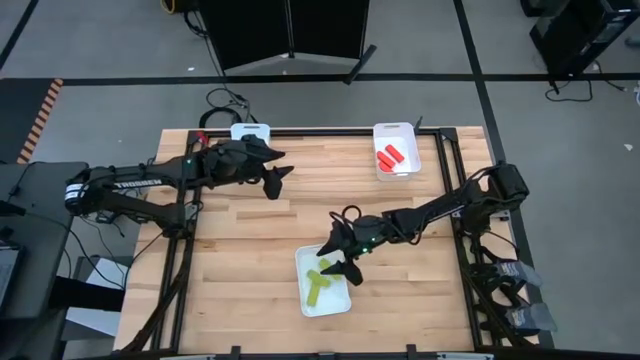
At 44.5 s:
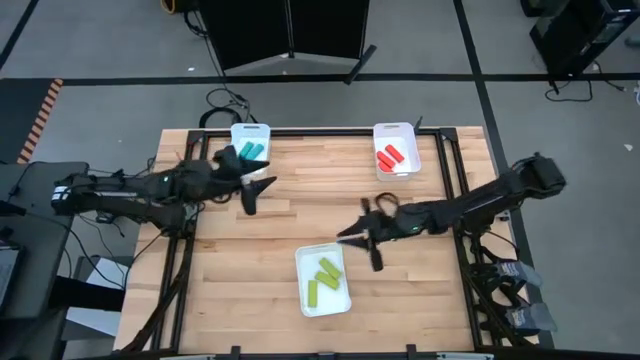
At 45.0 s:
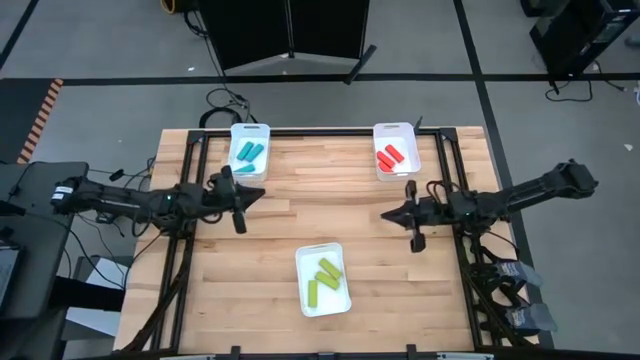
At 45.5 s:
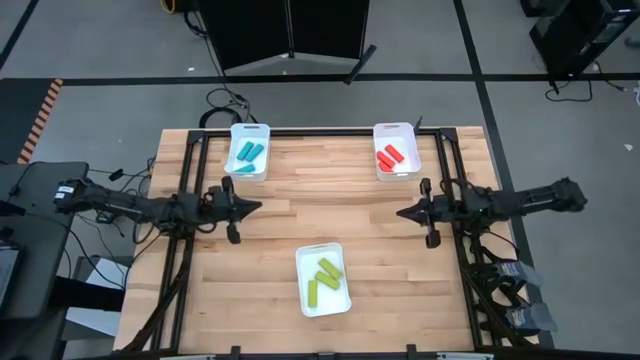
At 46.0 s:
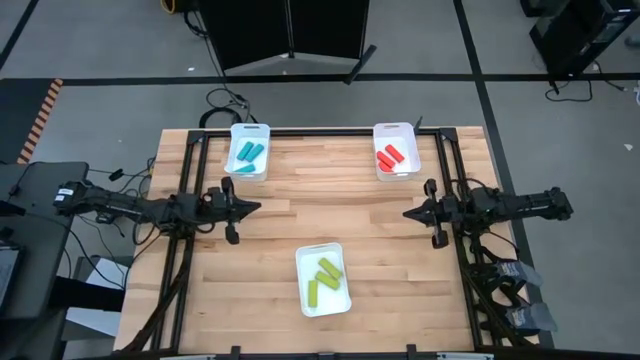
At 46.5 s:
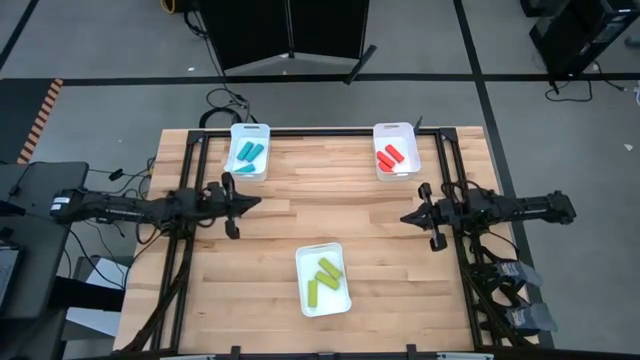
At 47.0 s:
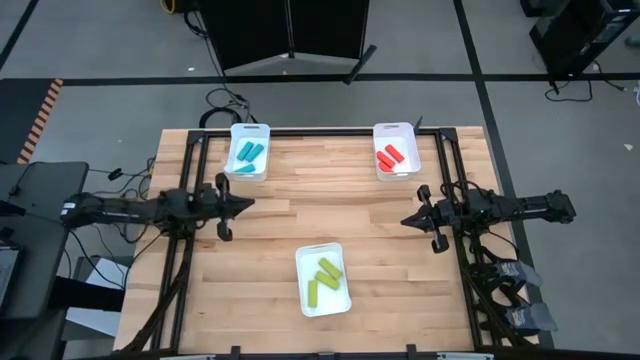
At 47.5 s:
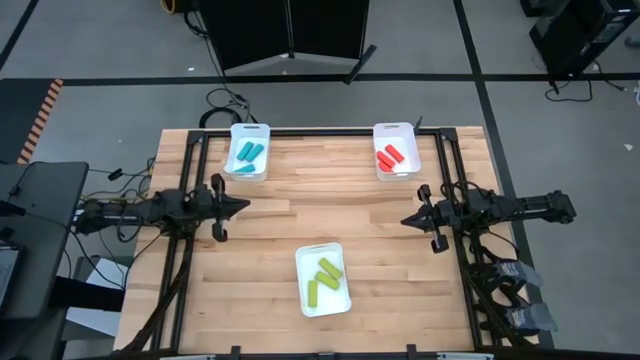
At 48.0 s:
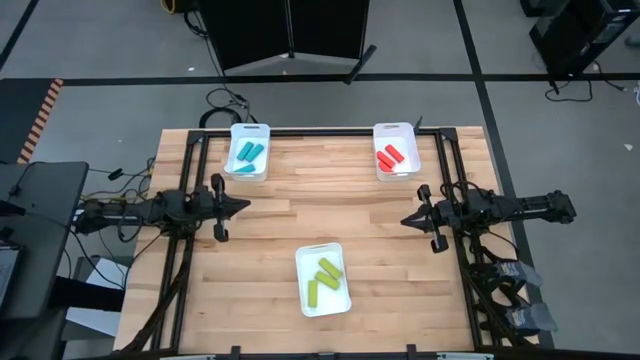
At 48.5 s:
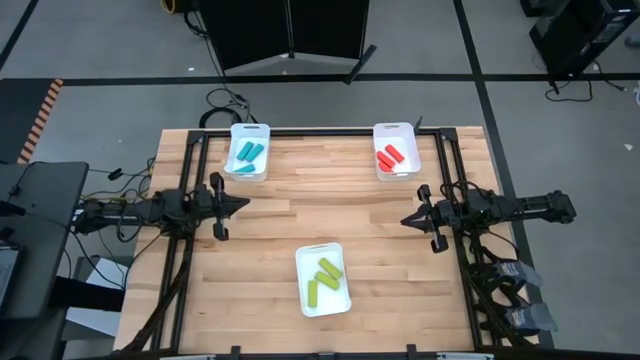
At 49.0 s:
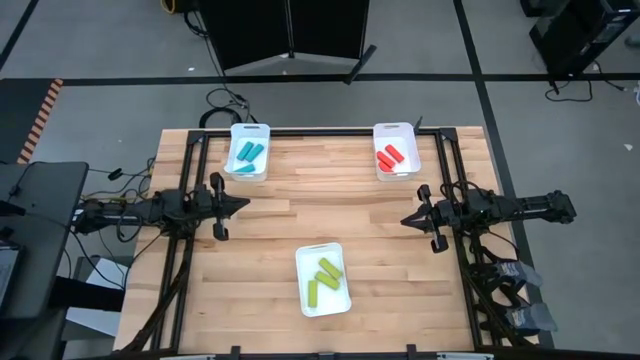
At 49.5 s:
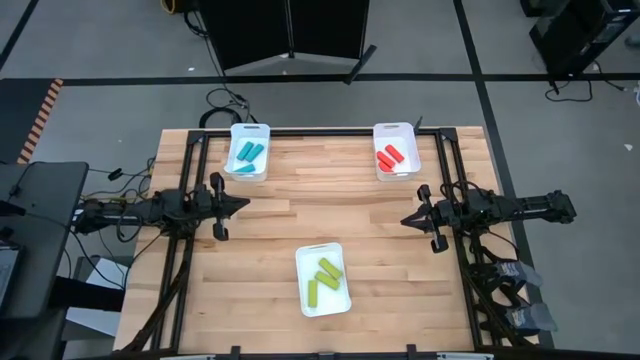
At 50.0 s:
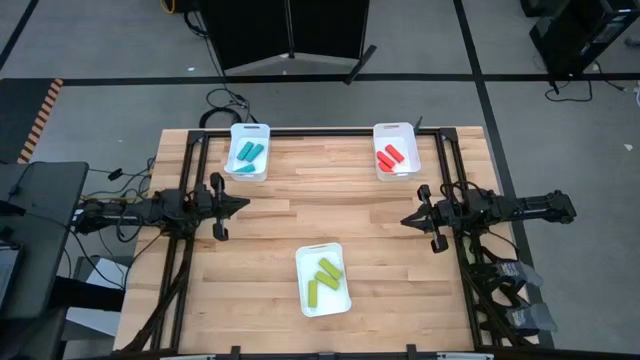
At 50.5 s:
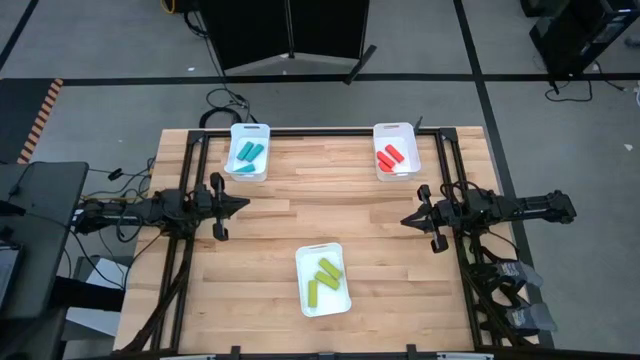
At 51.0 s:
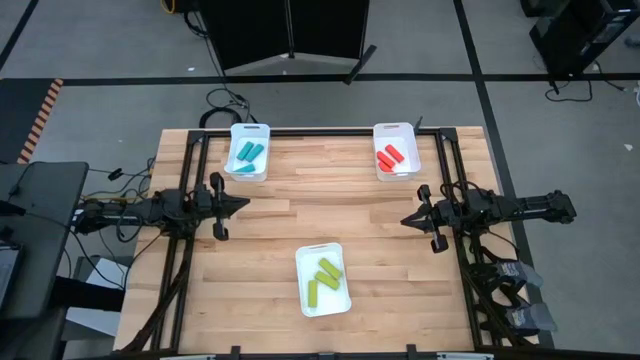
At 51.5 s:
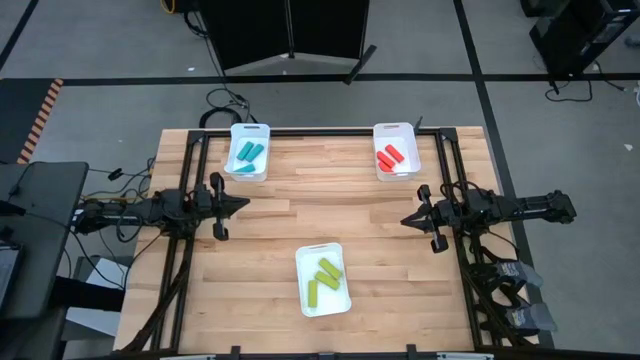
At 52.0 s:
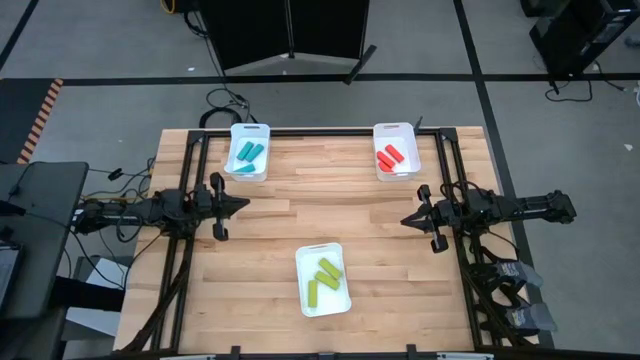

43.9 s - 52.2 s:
Task: Sort blocks
Return to Home Position

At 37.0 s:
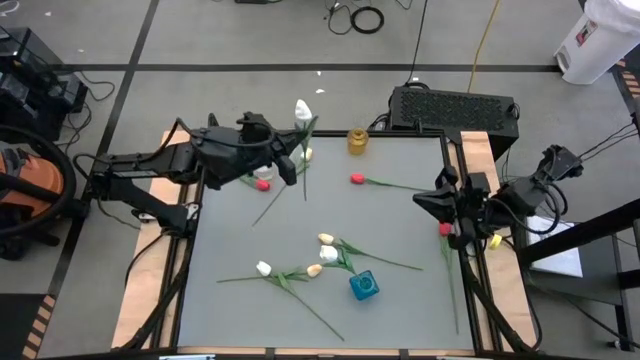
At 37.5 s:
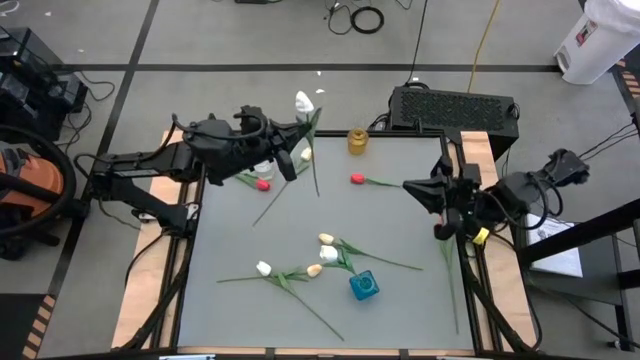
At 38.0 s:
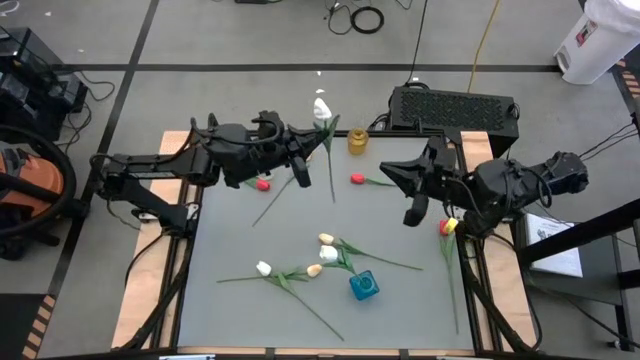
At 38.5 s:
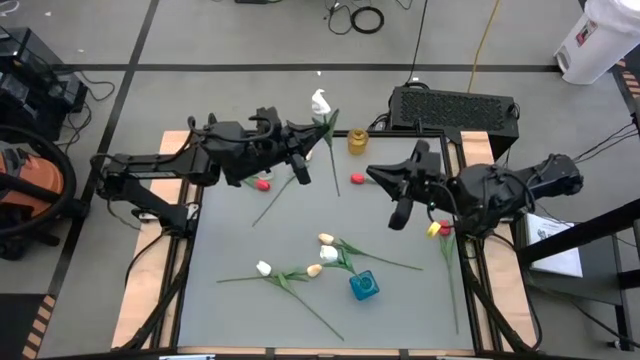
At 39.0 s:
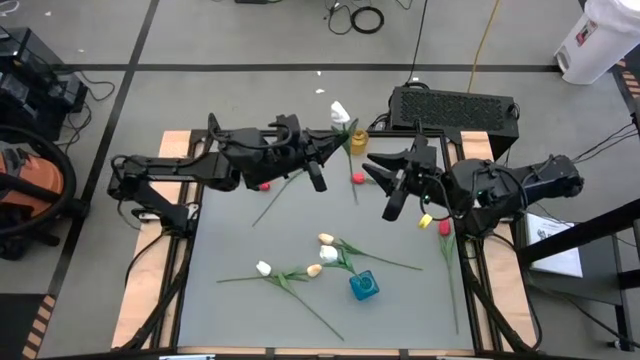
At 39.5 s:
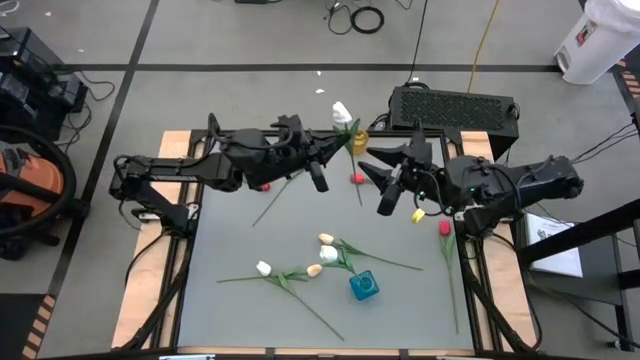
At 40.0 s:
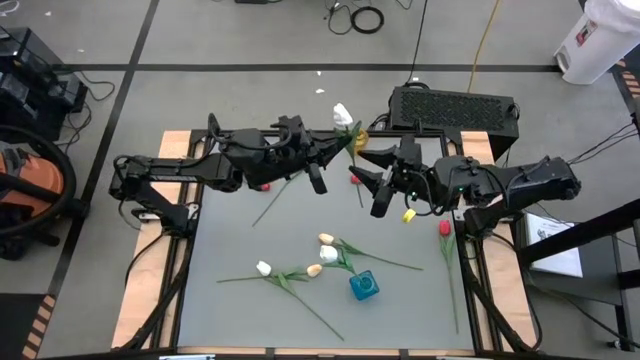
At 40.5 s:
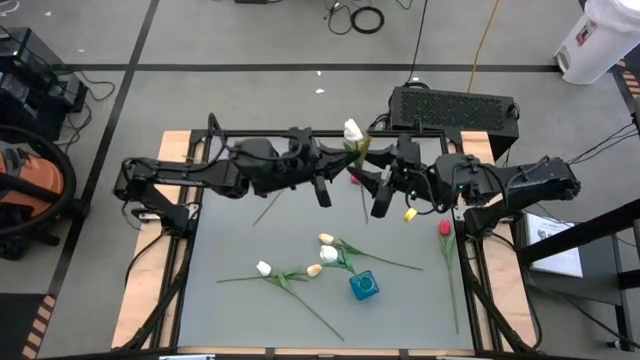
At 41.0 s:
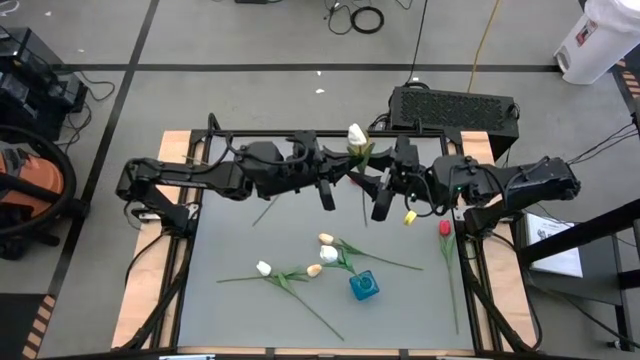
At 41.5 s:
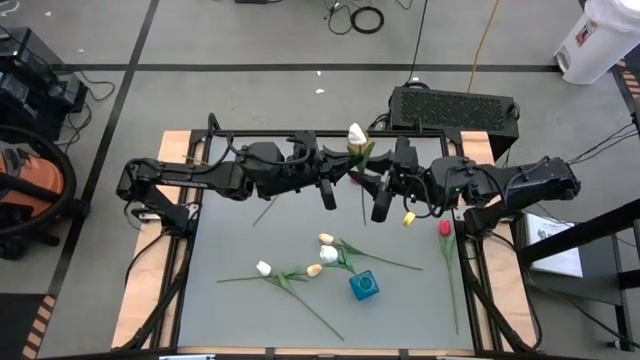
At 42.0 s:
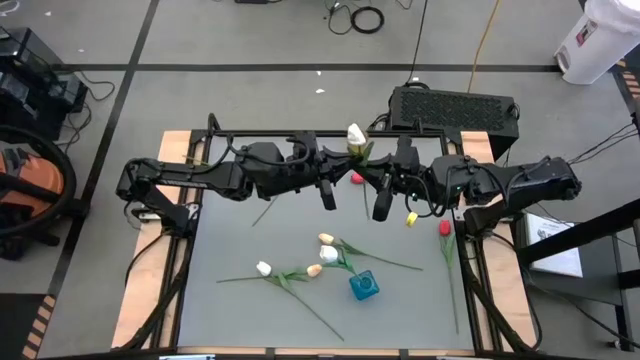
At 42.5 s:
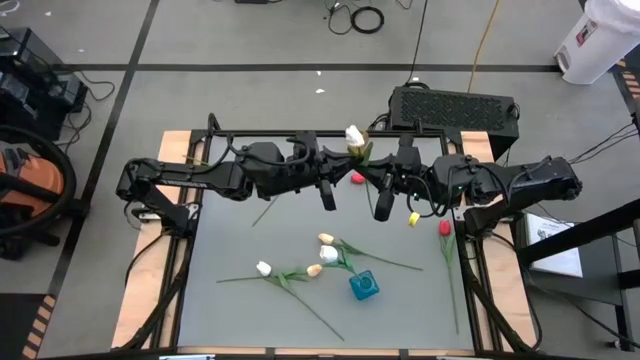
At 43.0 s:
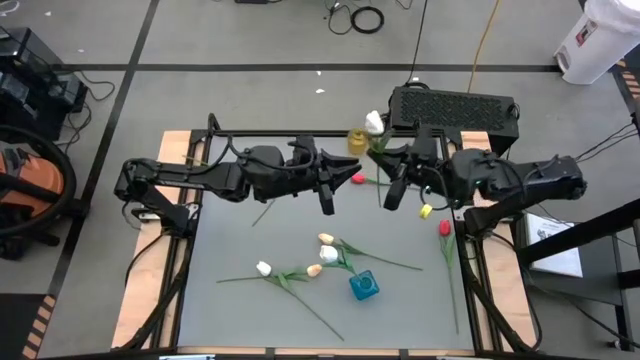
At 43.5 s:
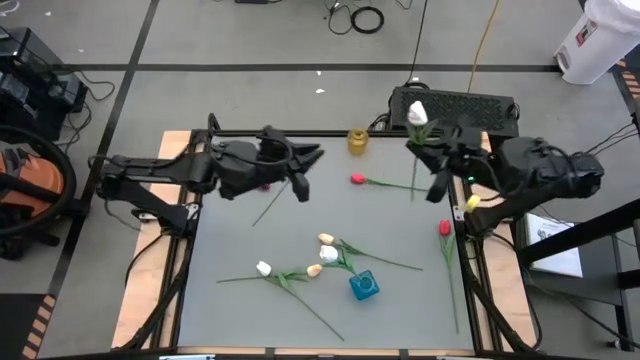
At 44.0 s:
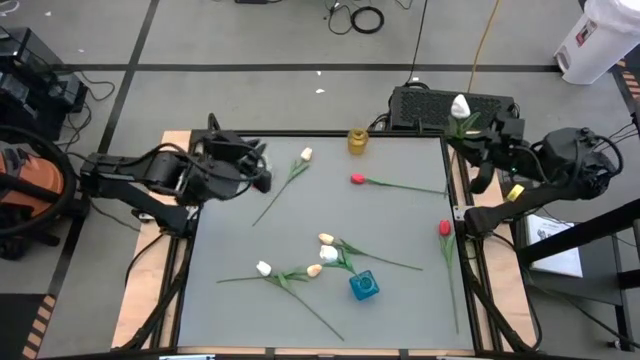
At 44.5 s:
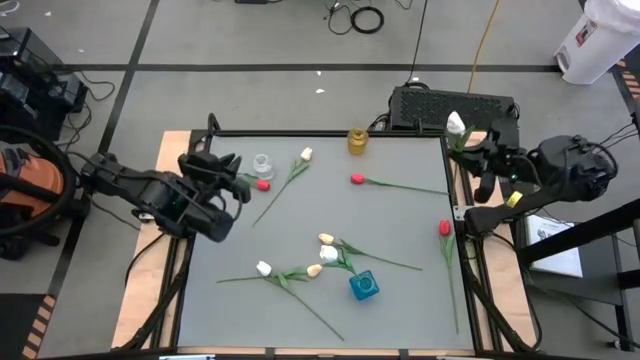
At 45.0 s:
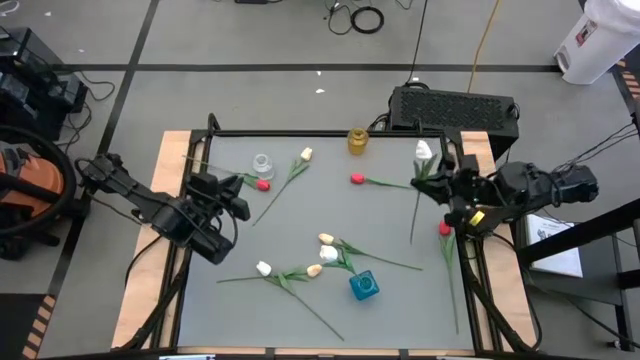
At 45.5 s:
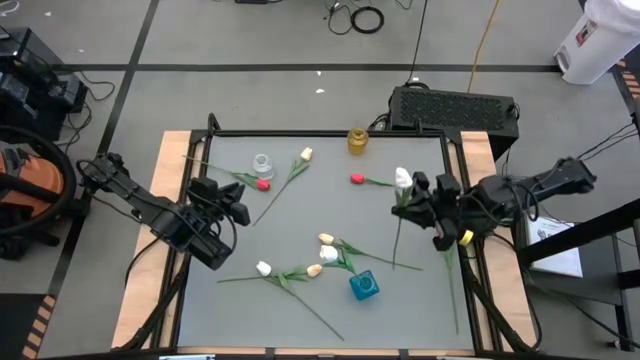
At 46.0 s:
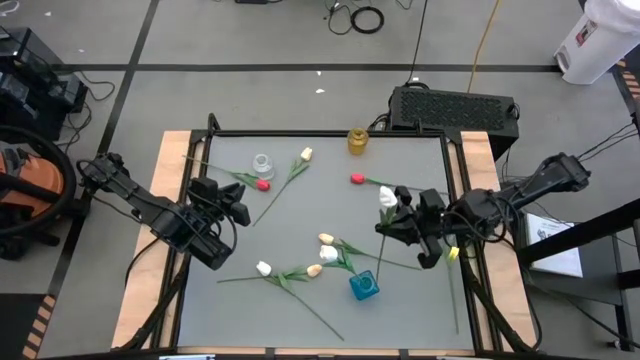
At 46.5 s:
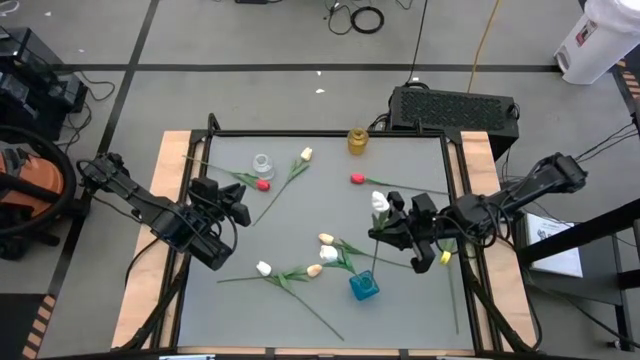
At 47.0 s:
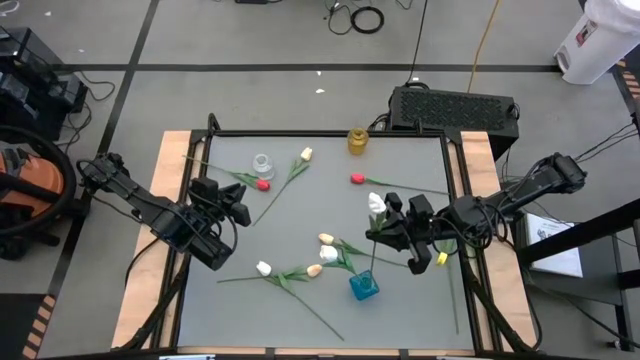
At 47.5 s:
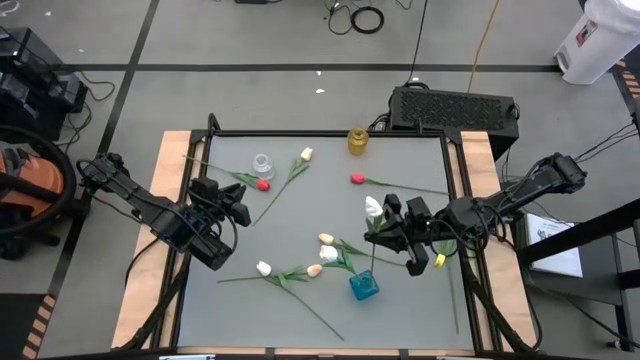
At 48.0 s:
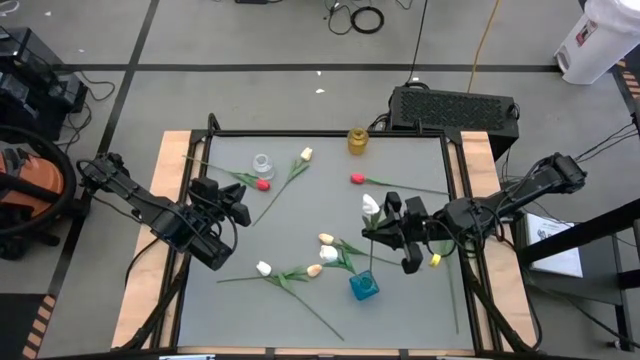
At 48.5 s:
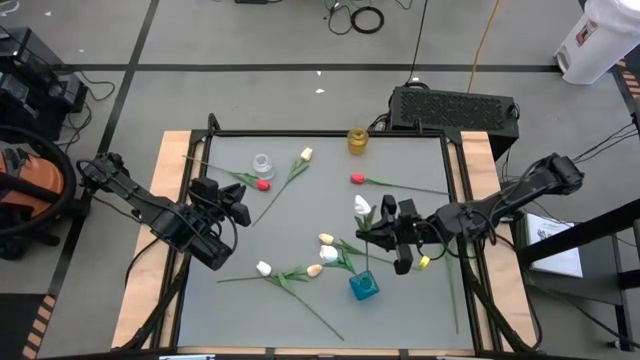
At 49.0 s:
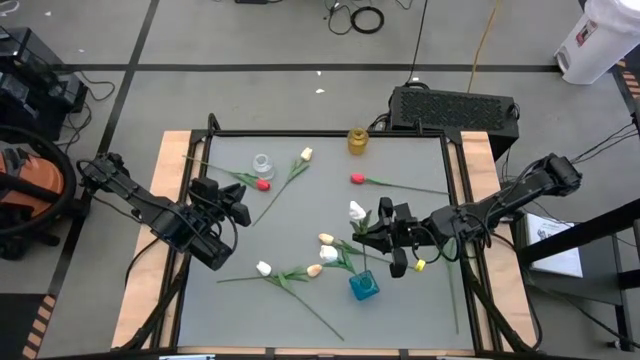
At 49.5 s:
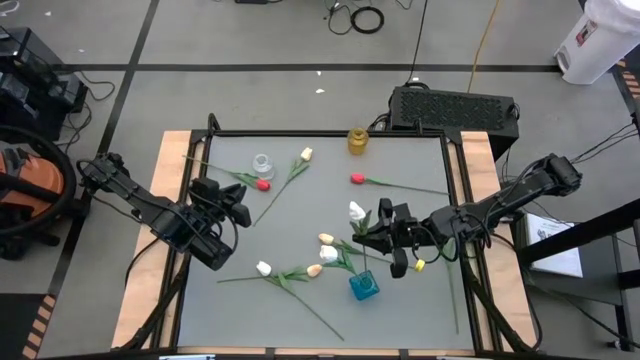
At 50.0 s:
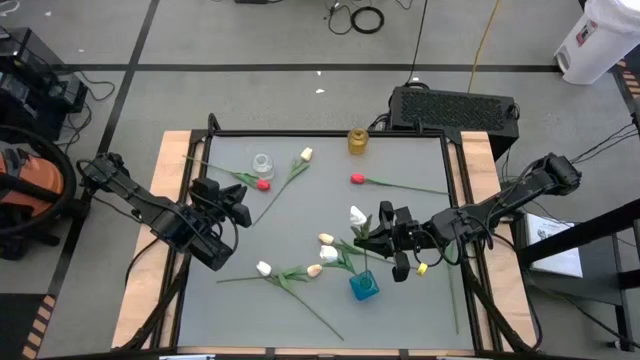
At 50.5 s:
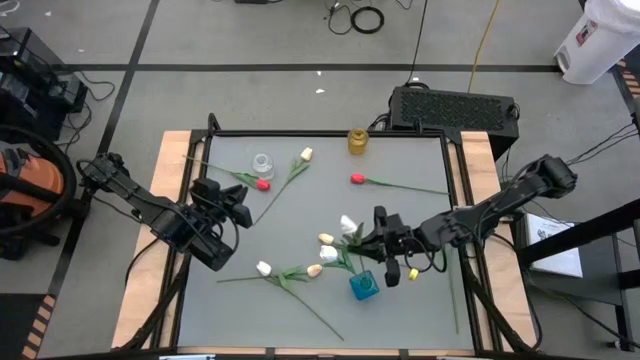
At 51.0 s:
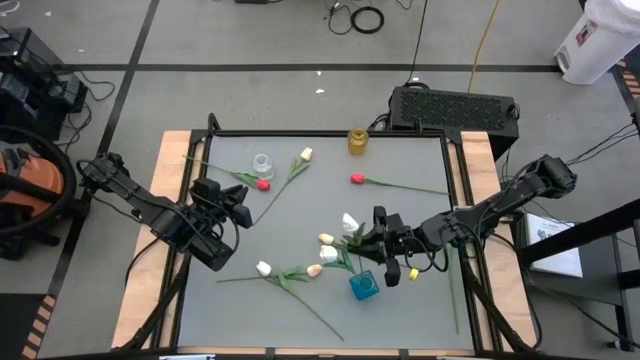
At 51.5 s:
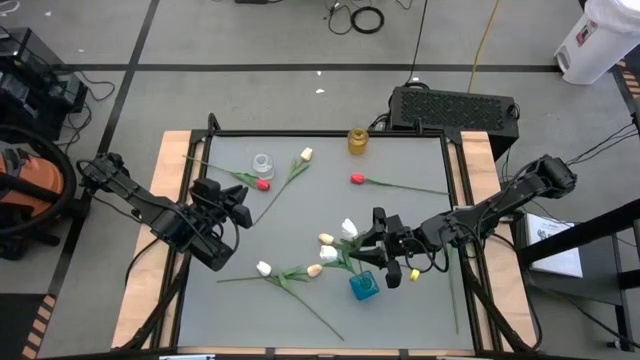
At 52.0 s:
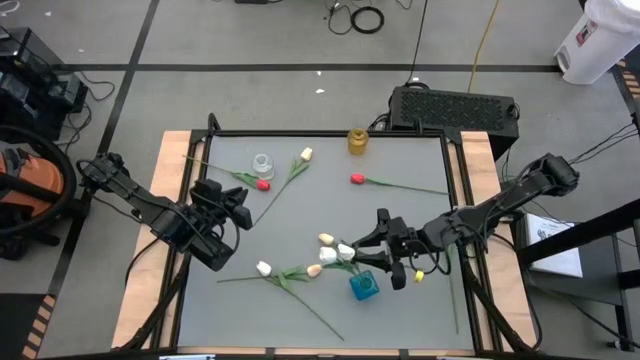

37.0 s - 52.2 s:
Task: Sort flowers into vase by color
Put the top white tulip into the blue vase
